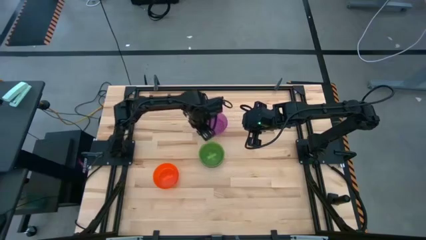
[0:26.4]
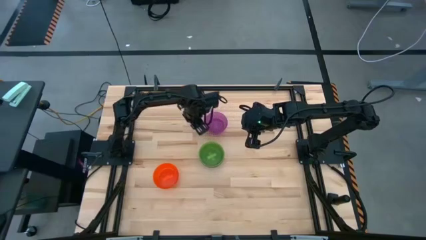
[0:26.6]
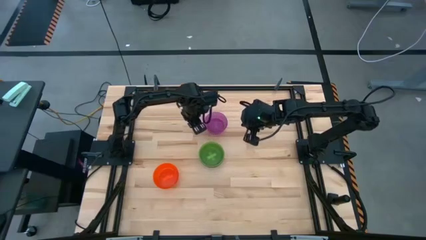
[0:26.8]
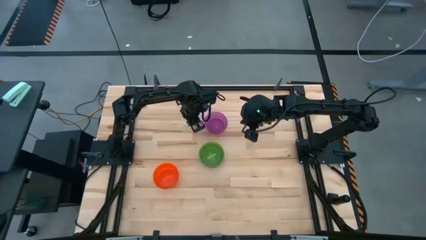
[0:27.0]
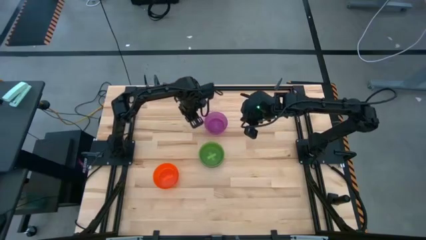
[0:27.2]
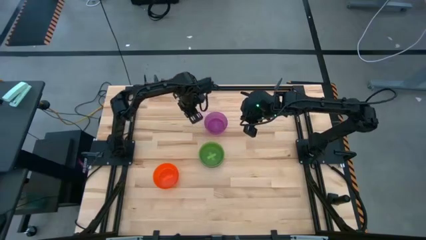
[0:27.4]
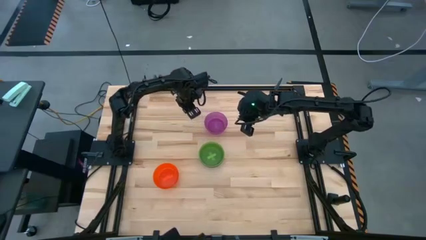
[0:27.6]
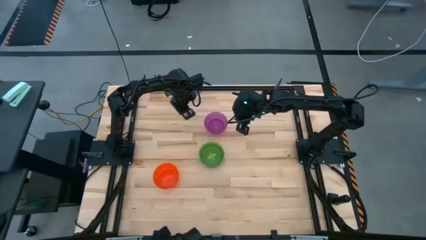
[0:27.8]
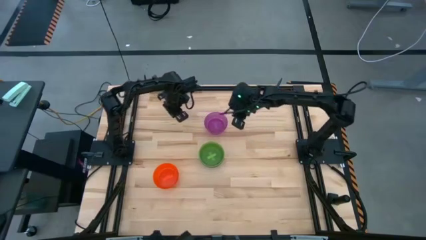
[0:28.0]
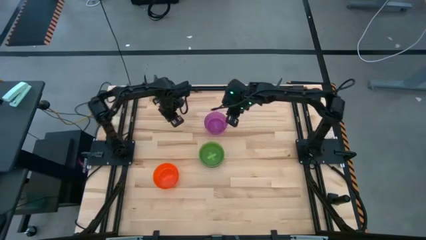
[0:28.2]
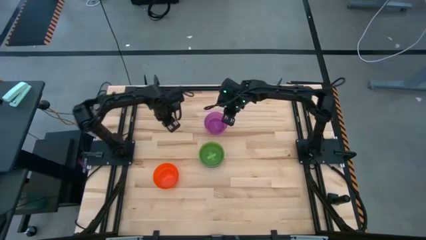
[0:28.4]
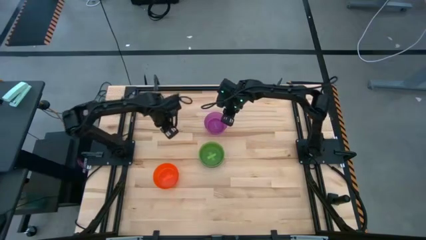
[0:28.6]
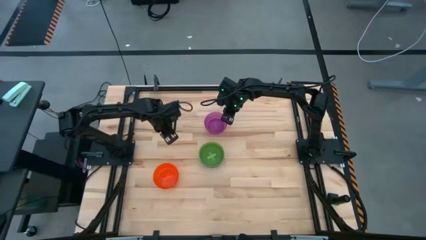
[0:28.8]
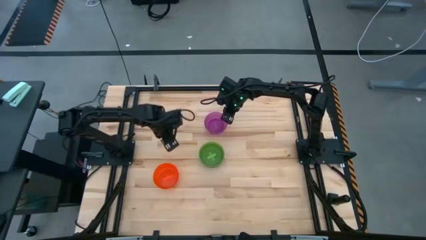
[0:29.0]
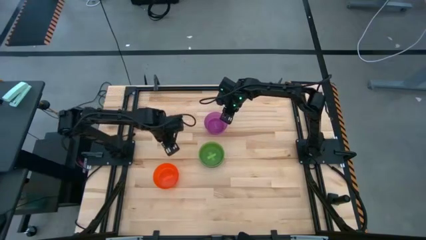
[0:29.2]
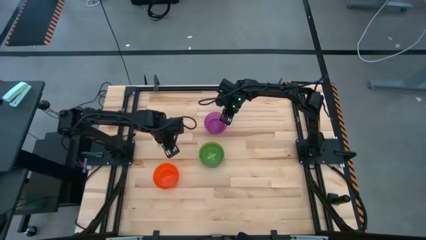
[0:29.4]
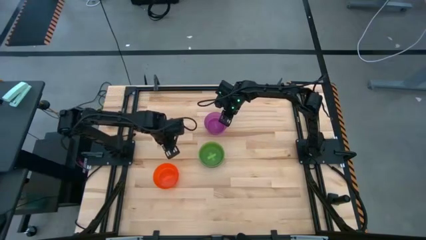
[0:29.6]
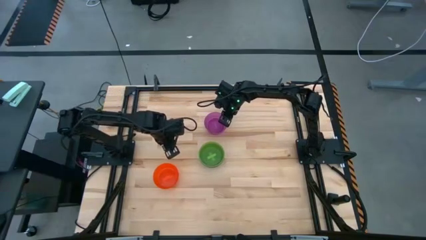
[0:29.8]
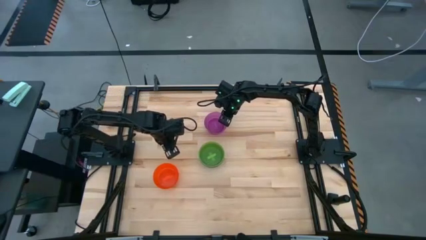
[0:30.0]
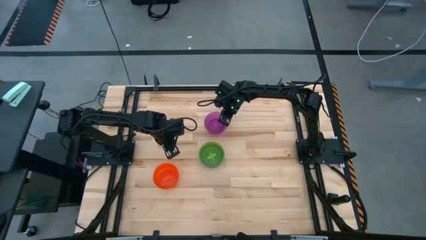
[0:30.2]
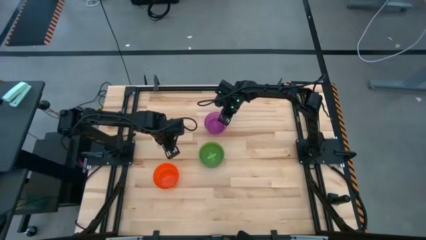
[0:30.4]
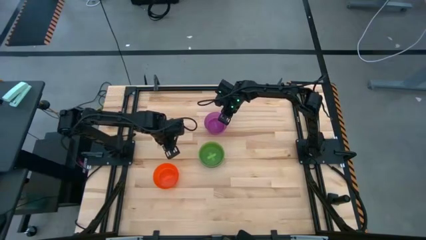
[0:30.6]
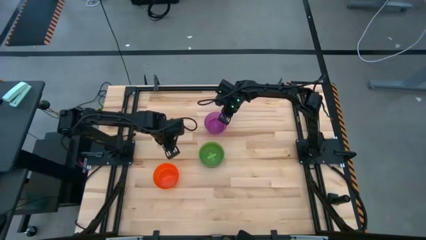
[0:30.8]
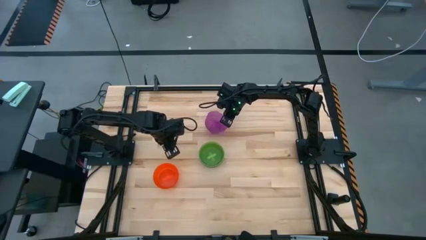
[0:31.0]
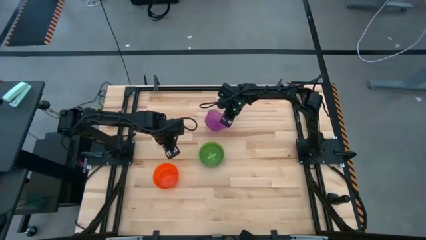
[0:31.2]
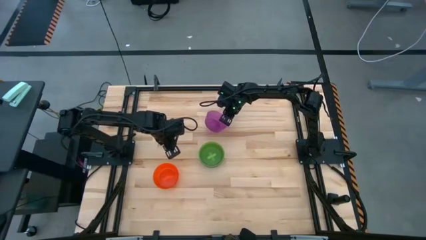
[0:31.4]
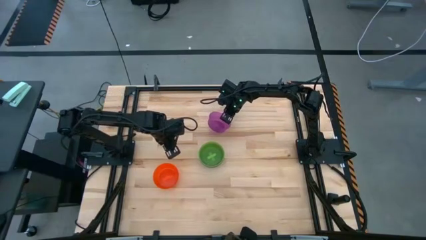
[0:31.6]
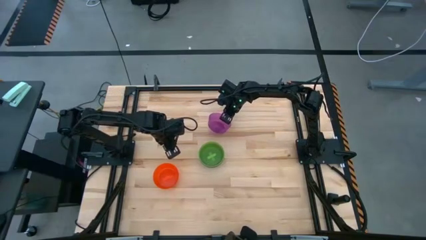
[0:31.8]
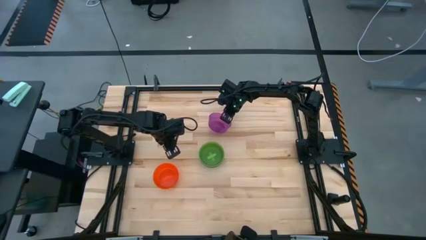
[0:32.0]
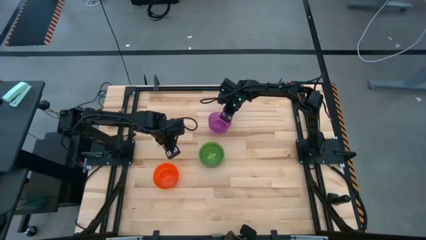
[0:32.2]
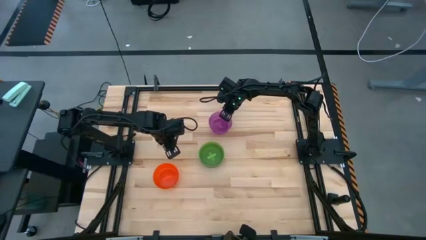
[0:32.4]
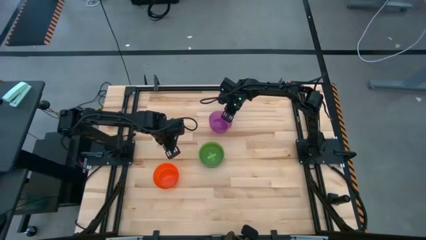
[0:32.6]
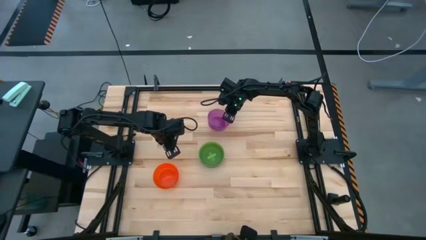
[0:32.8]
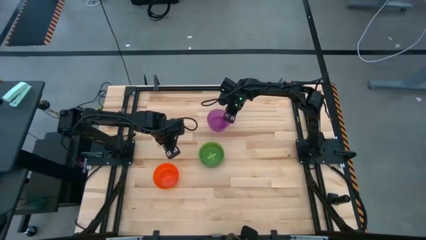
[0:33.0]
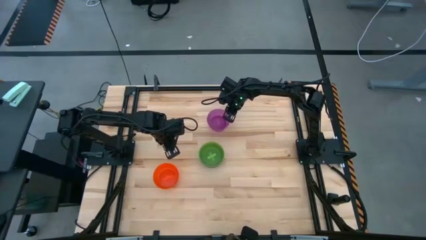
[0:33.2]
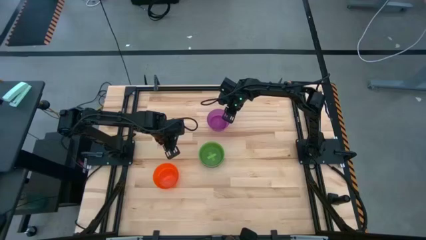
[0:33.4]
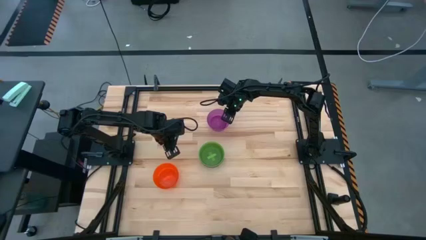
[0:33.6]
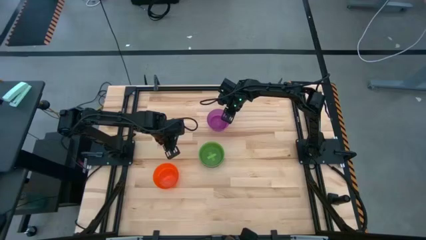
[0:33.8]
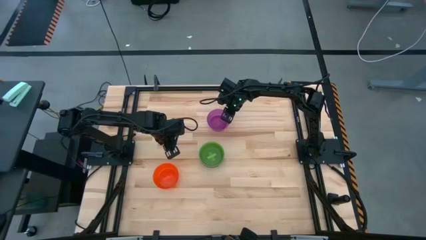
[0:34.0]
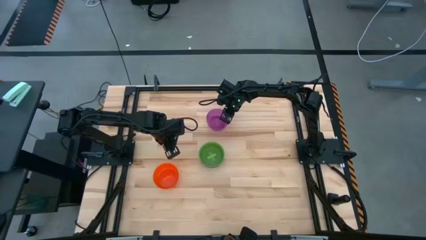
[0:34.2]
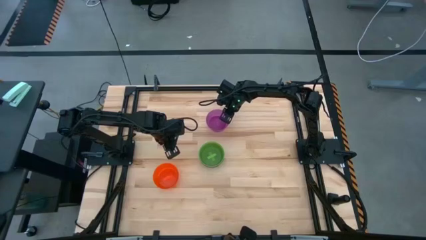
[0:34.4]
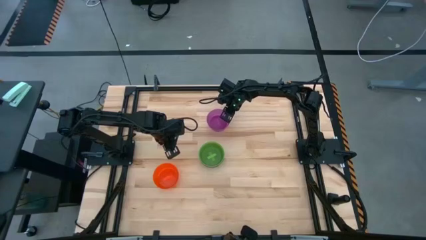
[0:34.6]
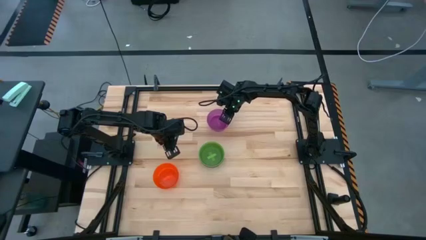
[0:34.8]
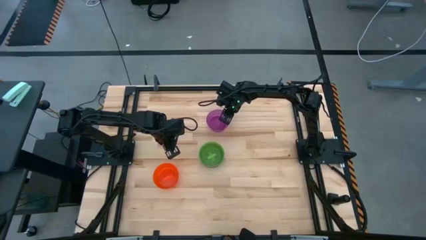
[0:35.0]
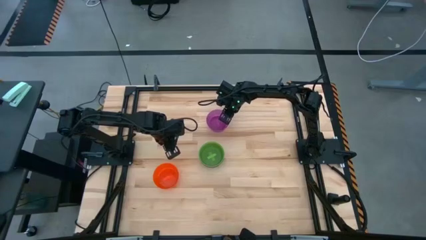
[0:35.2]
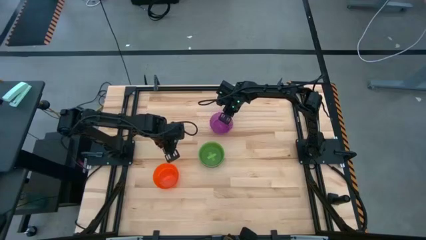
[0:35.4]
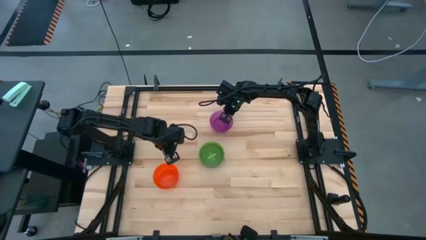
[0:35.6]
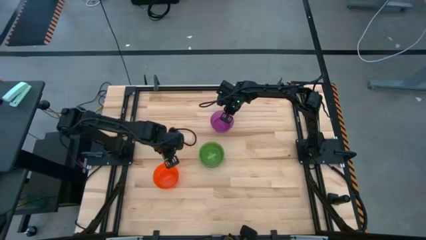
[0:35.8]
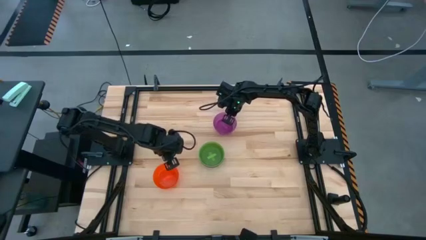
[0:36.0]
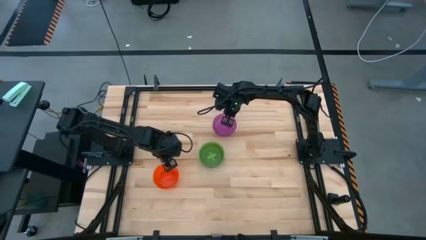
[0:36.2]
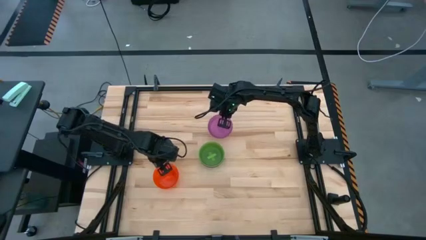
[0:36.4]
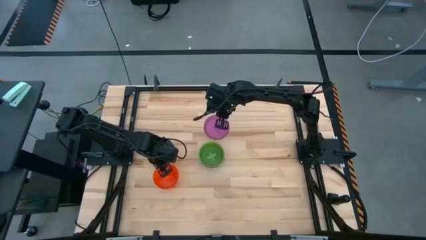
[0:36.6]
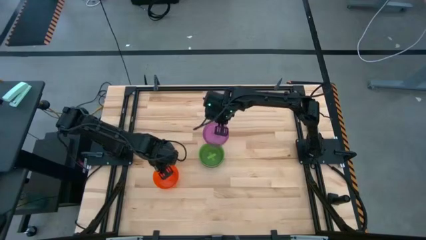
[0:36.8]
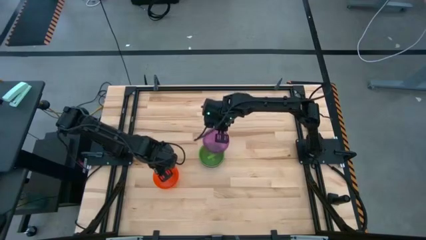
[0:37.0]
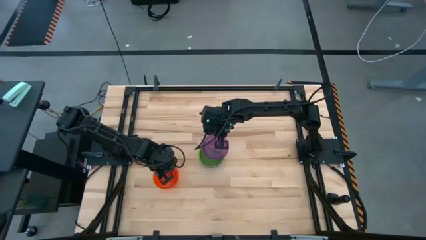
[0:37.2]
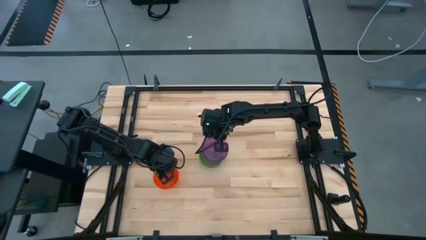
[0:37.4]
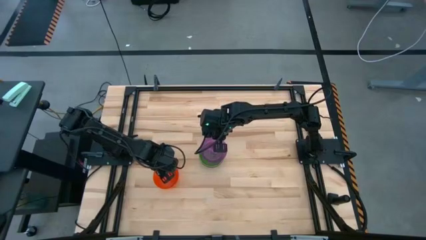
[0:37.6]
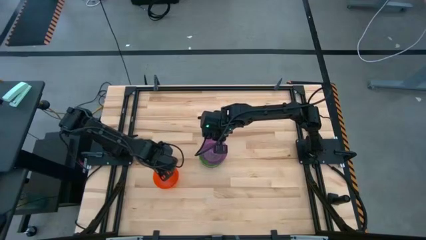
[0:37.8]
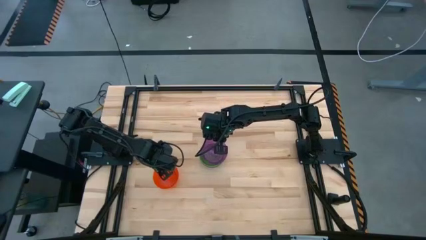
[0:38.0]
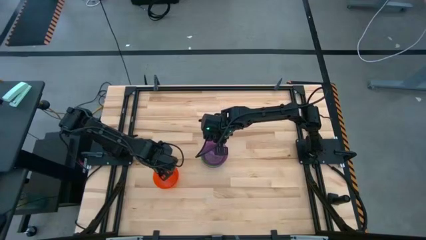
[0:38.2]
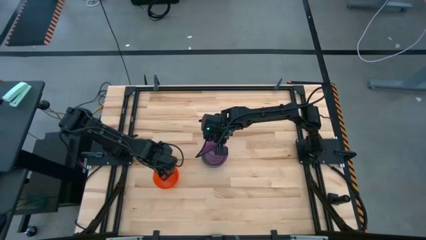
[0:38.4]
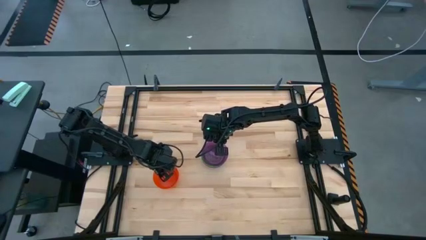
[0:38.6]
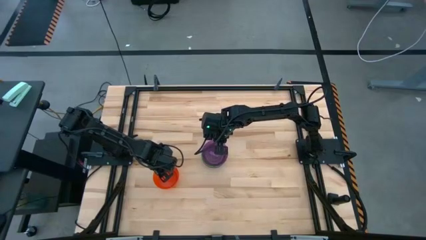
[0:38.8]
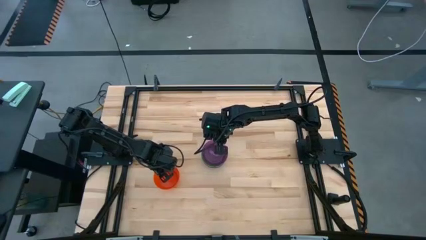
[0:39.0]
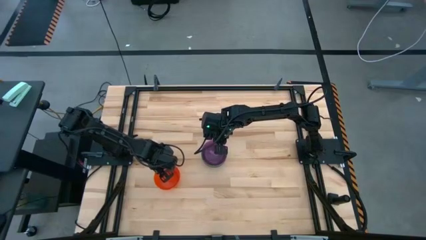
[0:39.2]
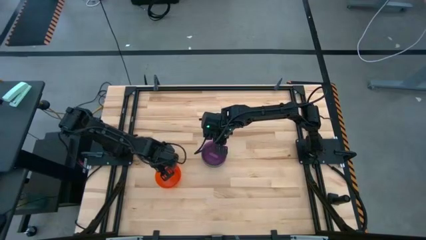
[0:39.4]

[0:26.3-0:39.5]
Task: Nest bowls inside each other
Stack the purple bowl on top of the green bowl

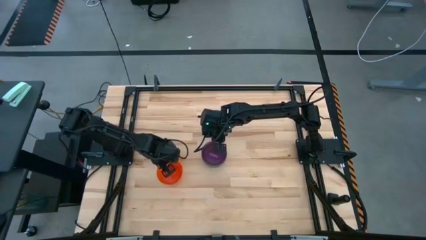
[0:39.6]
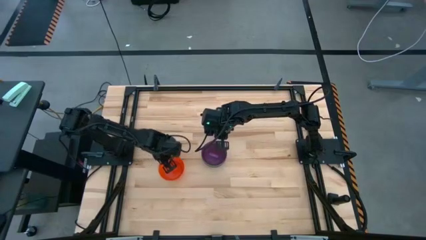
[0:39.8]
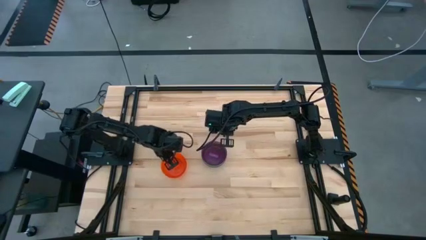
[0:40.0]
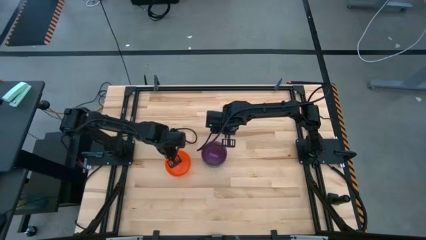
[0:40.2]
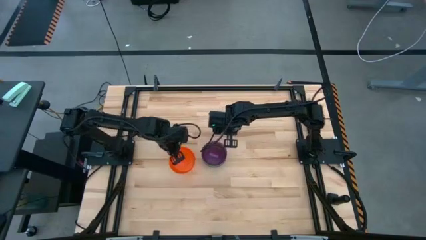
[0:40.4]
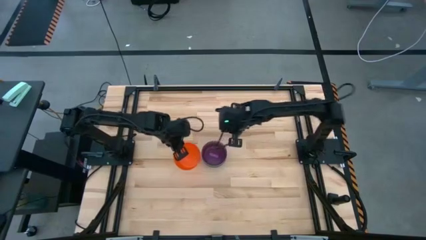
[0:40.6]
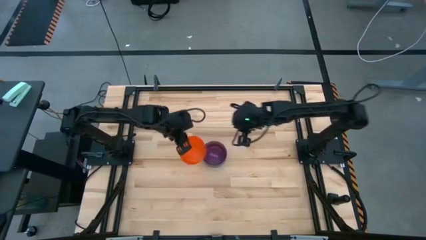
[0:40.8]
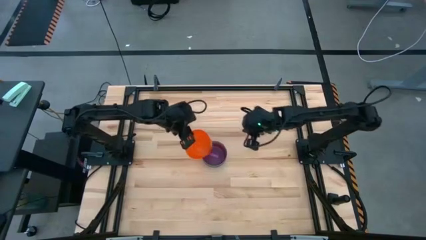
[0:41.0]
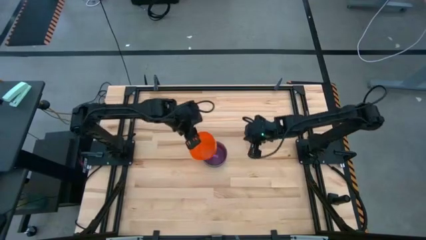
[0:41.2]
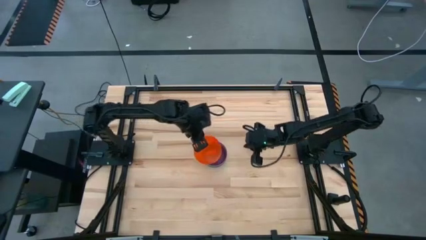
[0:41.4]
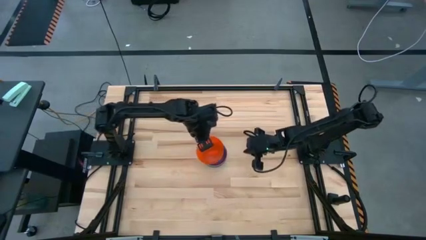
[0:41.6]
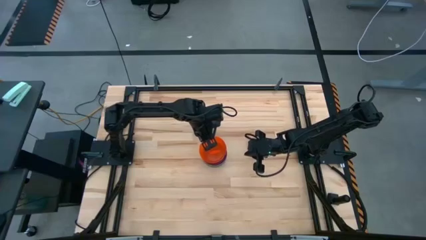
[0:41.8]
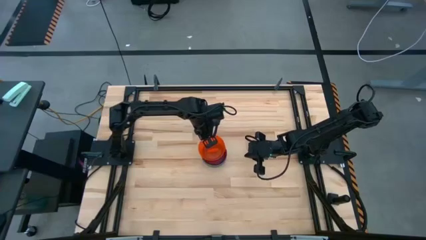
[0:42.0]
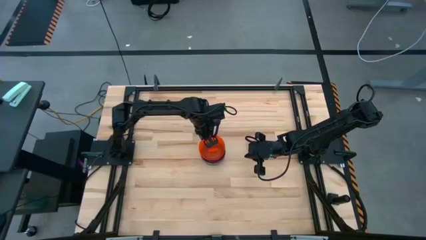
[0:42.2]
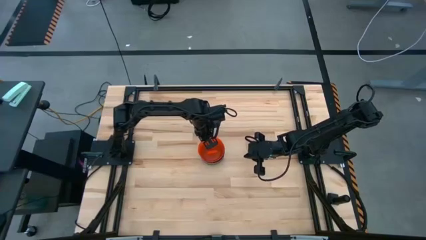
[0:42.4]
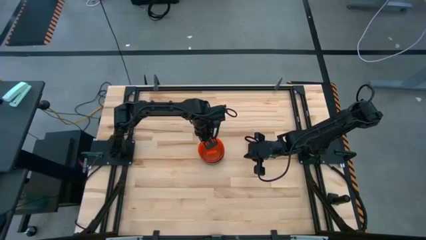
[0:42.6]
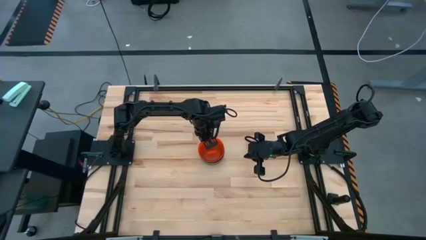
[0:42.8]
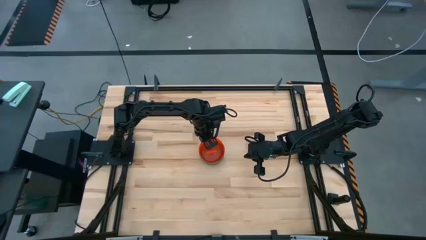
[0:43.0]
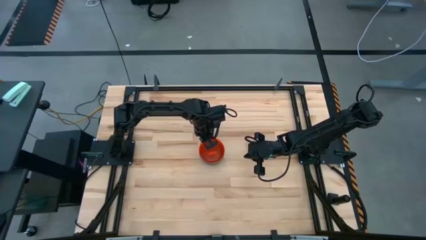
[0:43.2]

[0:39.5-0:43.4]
Stack the orange bowl on top of the purple bowl
